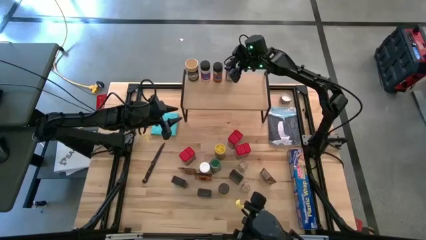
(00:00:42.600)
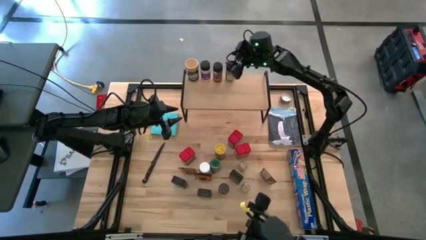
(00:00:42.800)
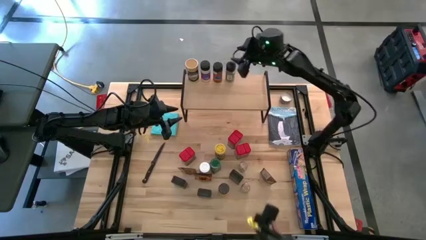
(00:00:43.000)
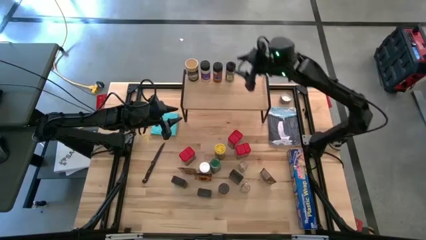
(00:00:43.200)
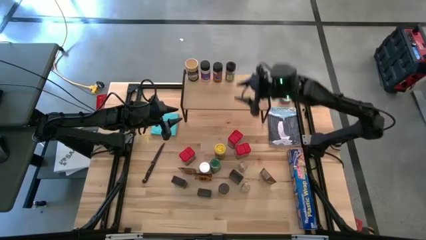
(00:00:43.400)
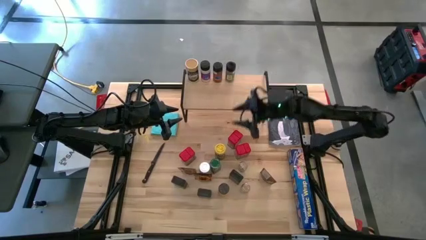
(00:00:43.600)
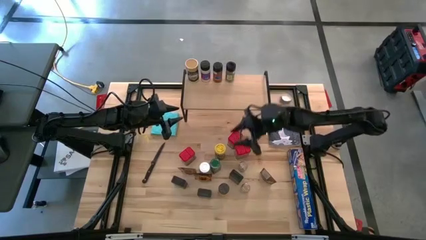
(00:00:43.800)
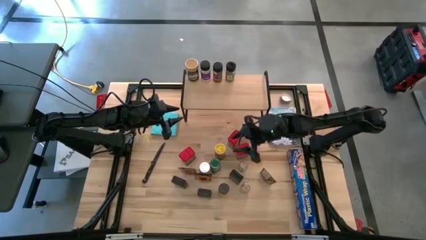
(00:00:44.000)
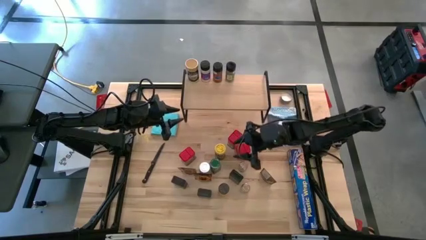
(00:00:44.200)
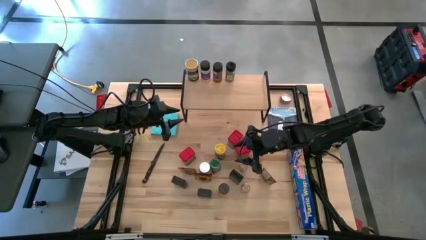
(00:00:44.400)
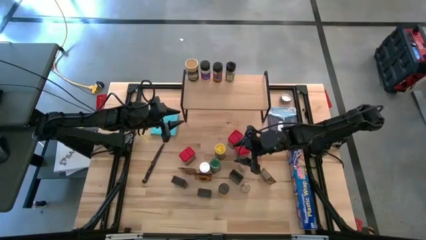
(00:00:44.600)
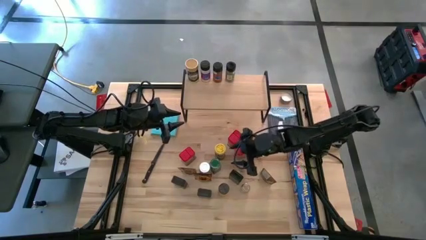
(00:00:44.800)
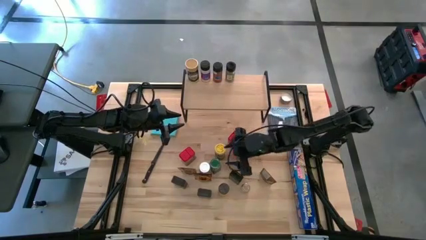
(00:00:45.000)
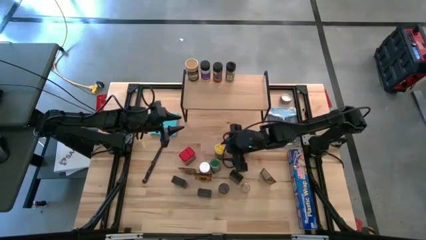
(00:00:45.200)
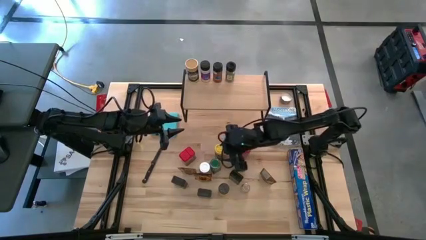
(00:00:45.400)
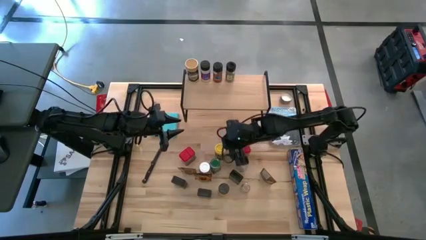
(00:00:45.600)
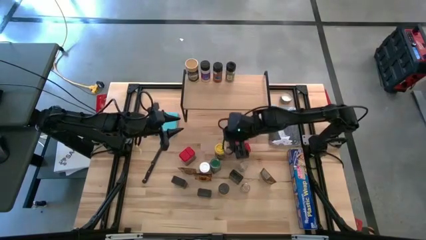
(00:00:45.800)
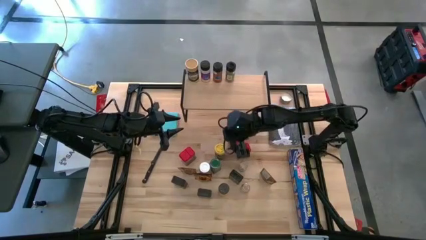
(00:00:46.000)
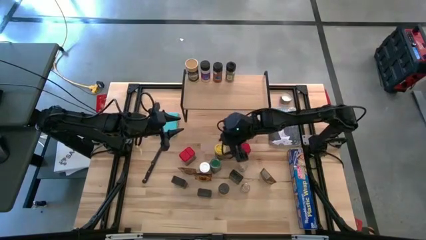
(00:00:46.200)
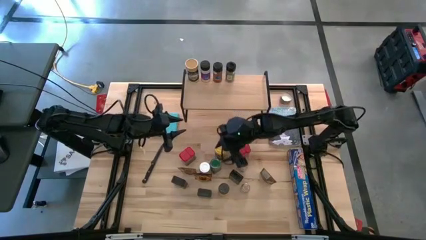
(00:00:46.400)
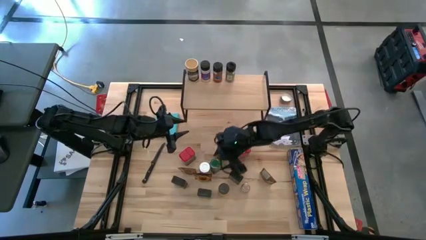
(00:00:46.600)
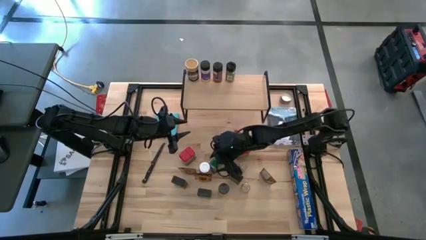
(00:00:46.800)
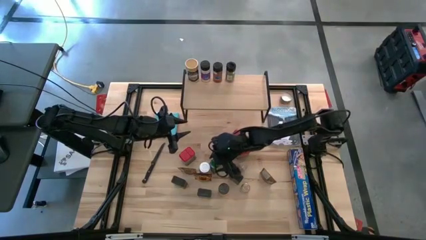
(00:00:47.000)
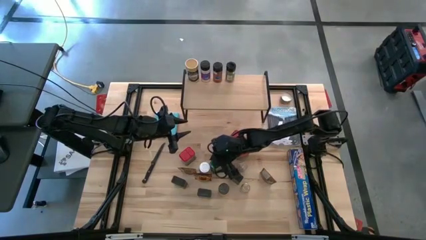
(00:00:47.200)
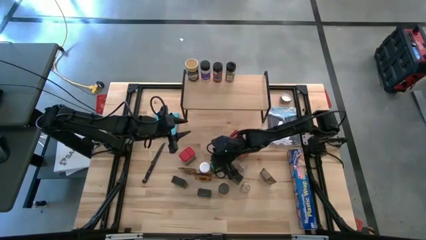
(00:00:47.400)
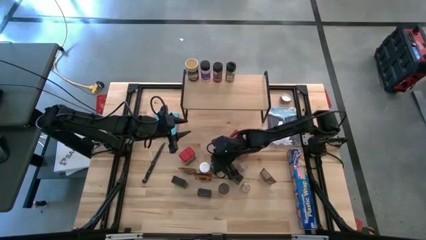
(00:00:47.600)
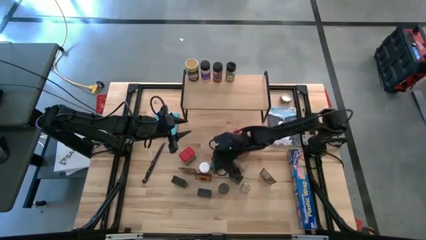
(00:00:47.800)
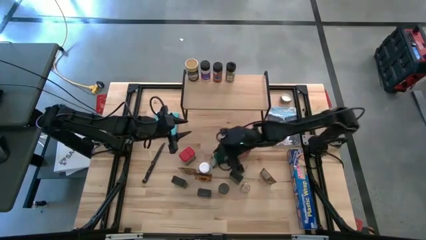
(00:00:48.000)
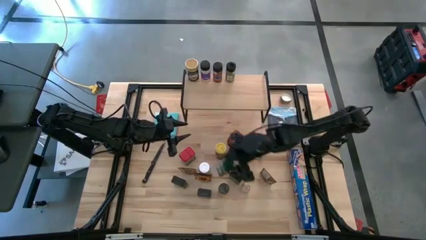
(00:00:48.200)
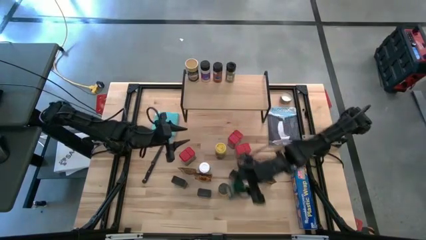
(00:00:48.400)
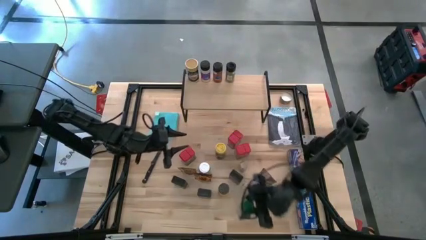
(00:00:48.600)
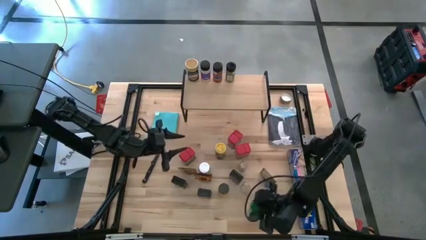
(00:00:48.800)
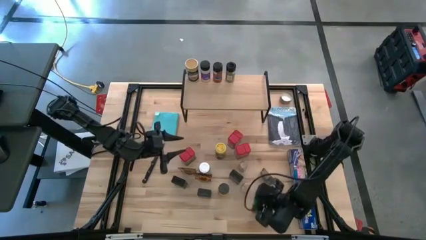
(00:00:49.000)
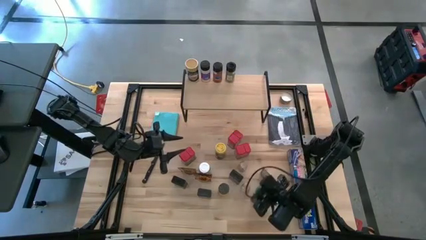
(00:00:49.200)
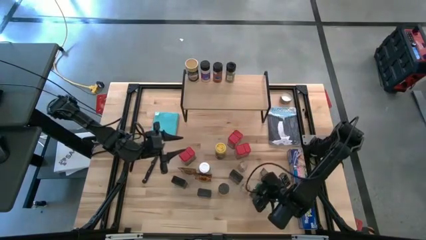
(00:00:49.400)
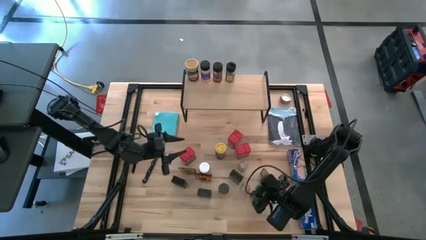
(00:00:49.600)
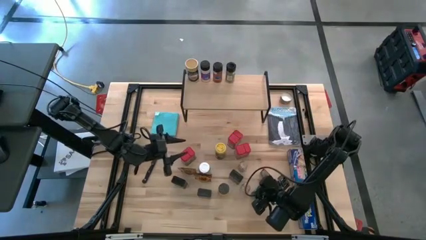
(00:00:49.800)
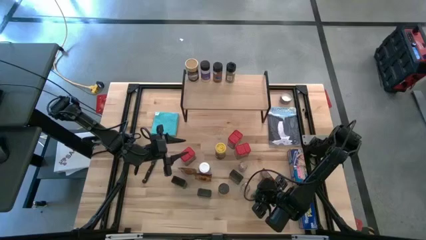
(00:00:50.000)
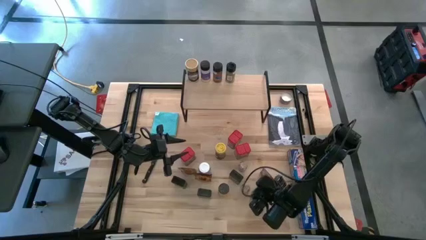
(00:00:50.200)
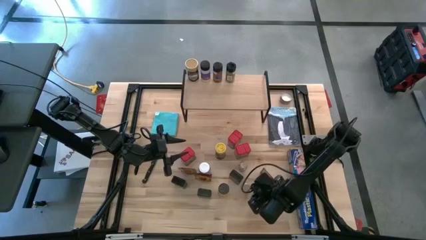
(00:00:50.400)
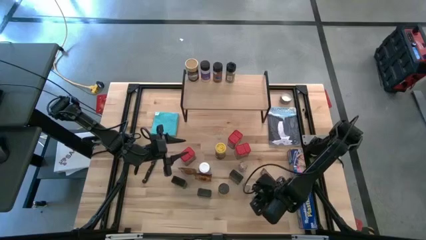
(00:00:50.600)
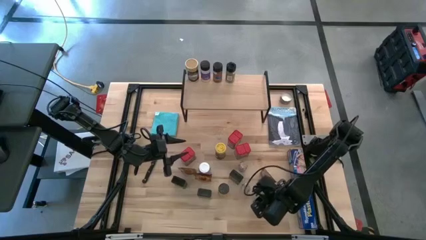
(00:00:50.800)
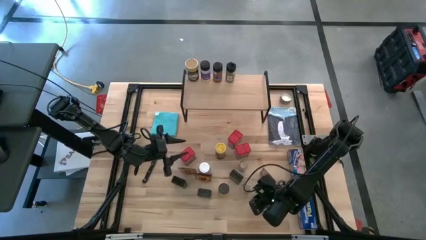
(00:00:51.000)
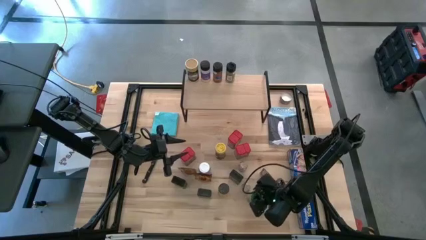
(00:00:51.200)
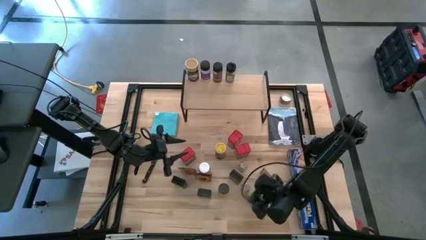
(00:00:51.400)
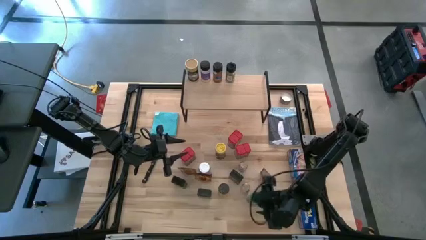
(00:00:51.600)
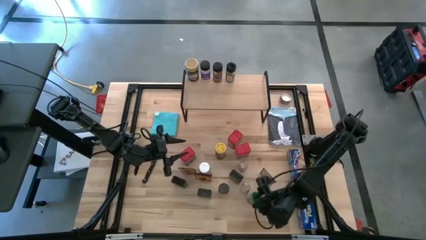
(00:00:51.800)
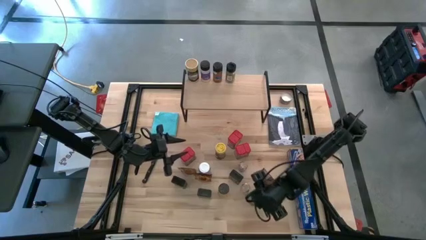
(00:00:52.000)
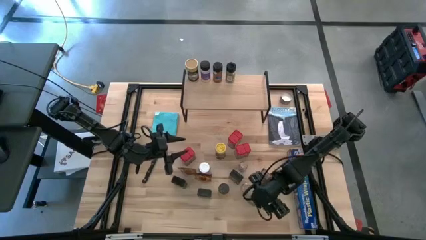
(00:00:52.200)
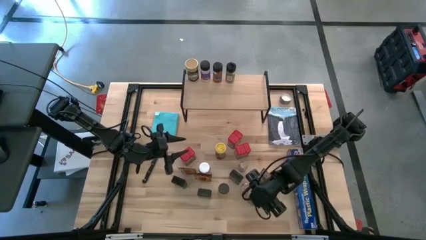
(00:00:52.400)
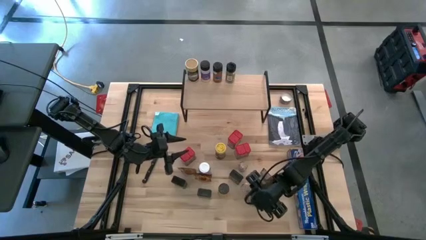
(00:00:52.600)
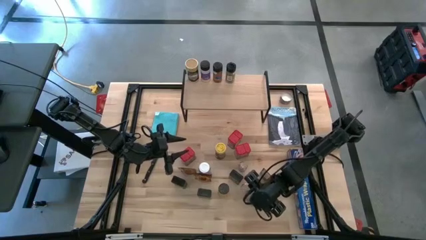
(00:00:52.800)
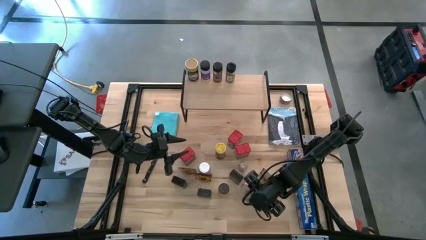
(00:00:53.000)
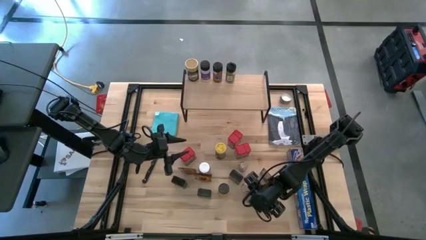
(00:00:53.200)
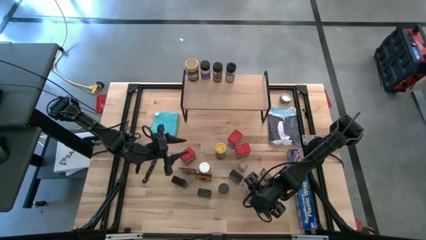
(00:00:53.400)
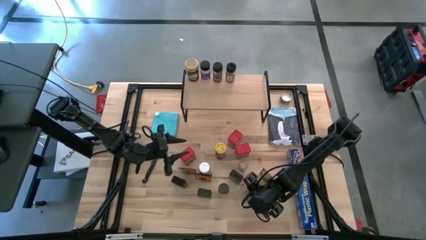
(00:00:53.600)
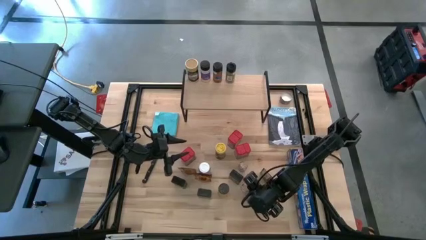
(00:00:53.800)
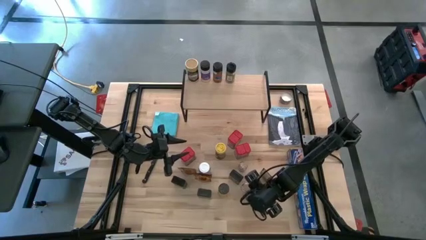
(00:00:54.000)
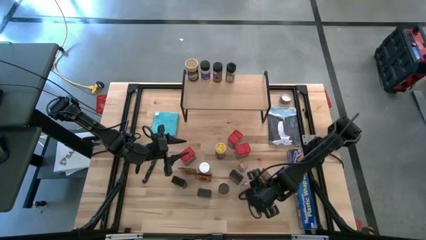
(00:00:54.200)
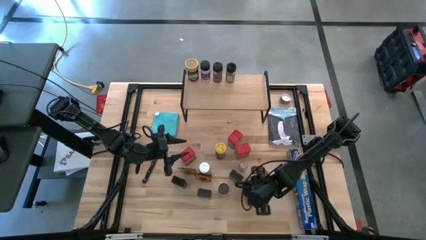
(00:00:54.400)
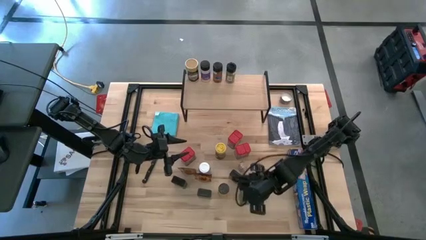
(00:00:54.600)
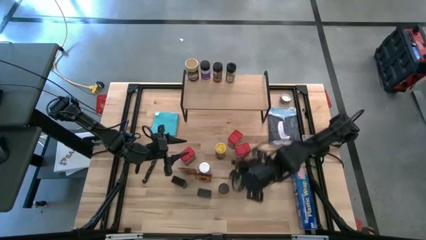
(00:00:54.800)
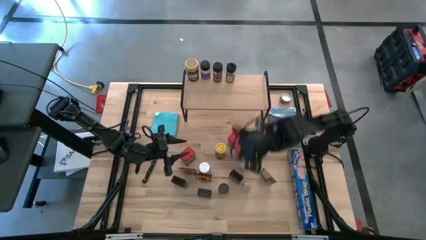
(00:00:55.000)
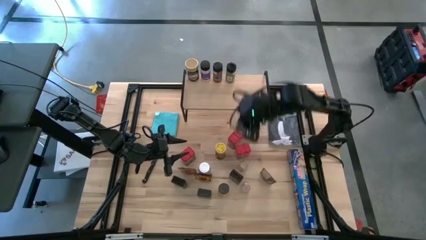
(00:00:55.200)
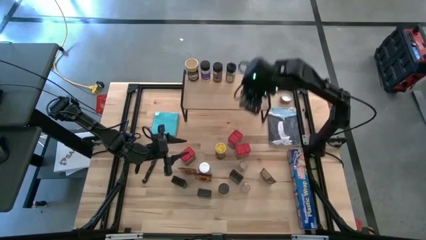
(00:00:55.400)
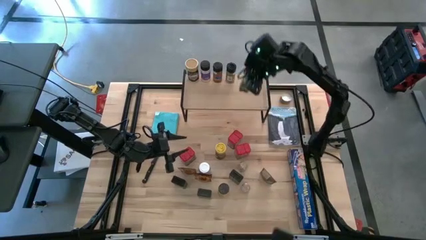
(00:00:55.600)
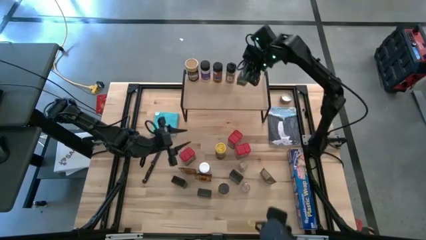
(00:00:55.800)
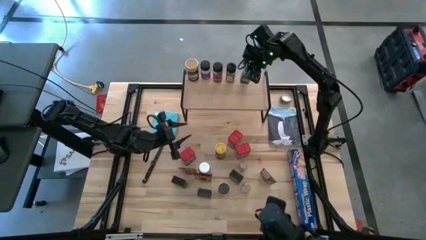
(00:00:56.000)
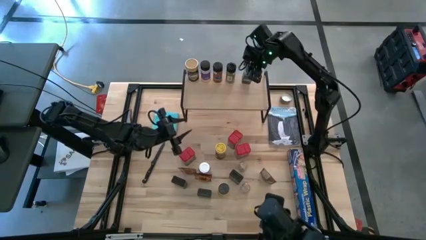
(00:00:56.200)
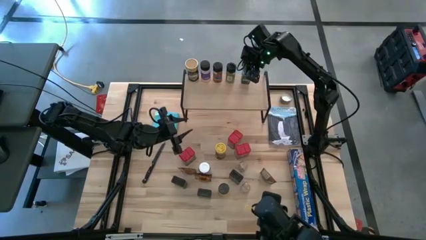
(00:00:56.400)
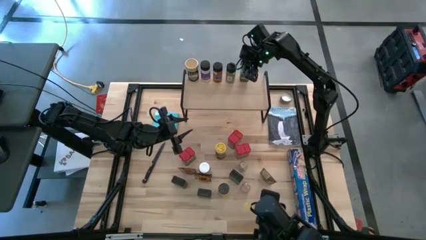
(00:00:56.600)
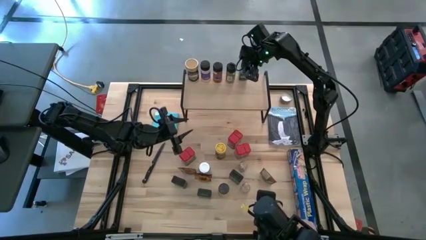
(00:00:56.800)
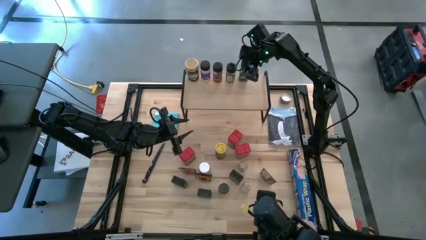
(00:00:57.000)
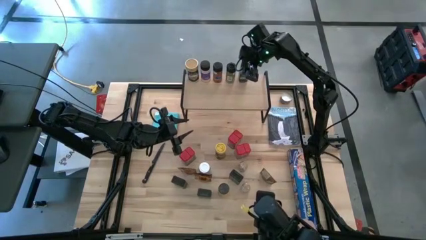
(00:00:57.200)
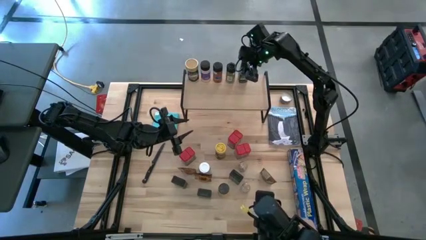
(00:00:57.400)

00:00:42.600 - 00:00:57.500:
Task: Shelf spices
Put the green seasoning bottle on the shelf
